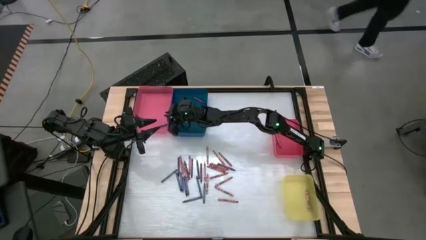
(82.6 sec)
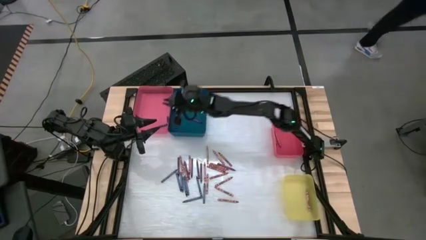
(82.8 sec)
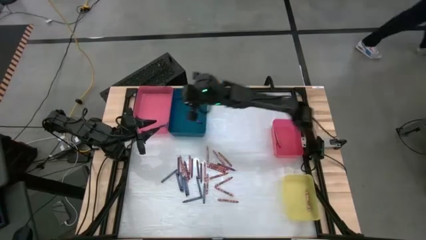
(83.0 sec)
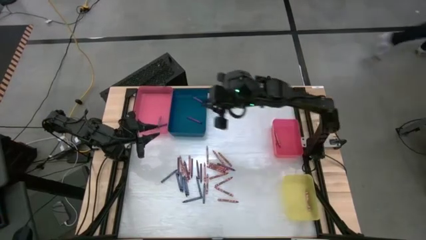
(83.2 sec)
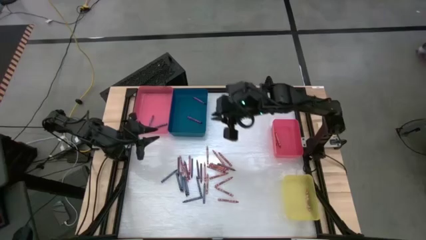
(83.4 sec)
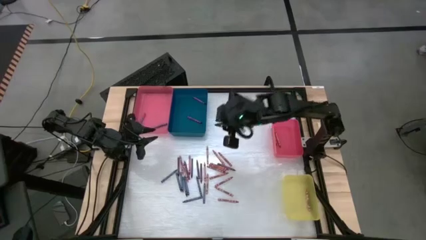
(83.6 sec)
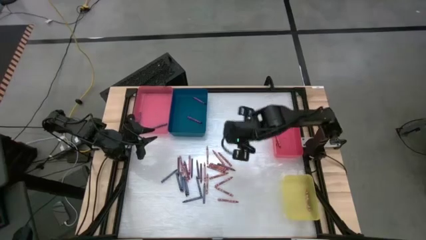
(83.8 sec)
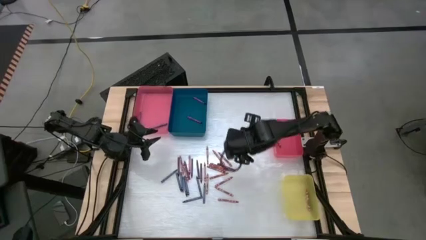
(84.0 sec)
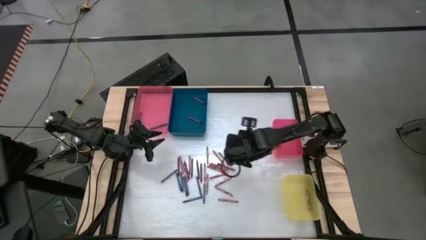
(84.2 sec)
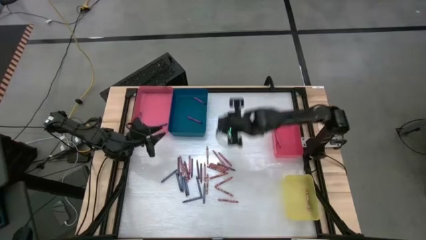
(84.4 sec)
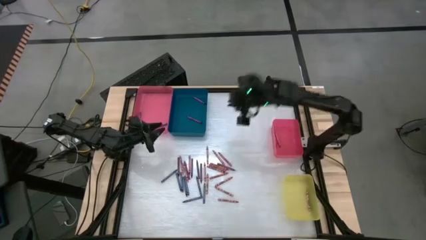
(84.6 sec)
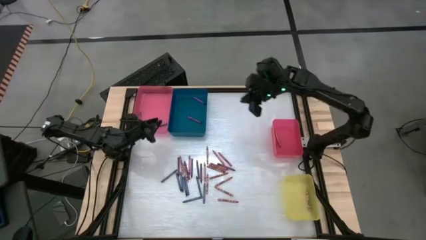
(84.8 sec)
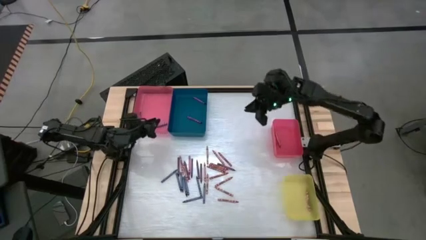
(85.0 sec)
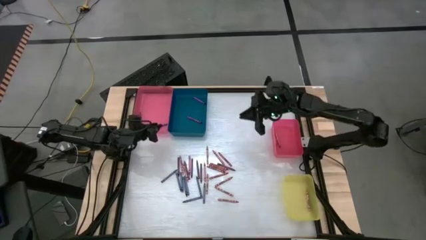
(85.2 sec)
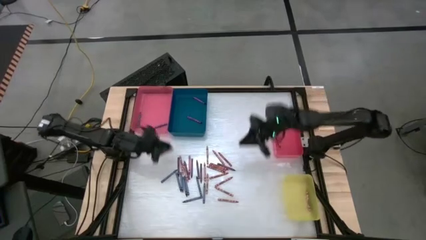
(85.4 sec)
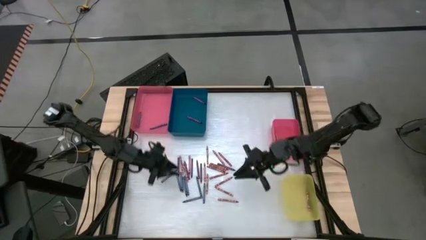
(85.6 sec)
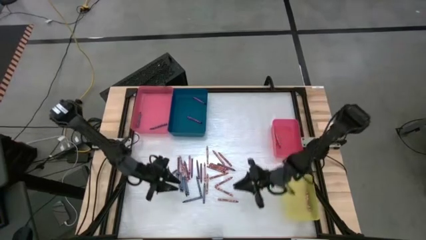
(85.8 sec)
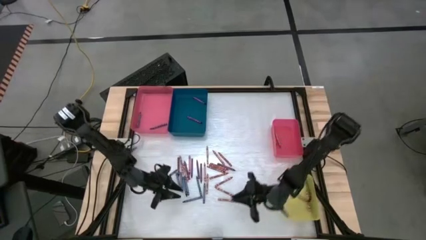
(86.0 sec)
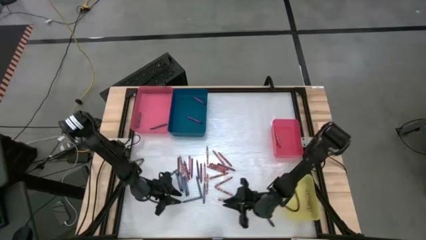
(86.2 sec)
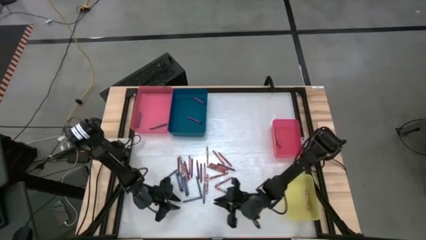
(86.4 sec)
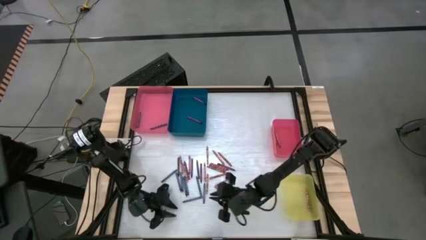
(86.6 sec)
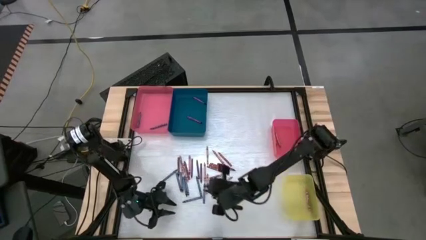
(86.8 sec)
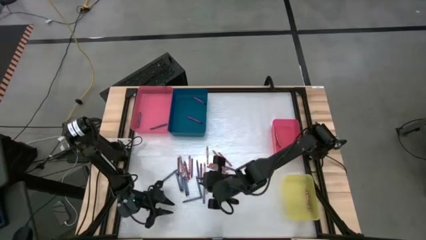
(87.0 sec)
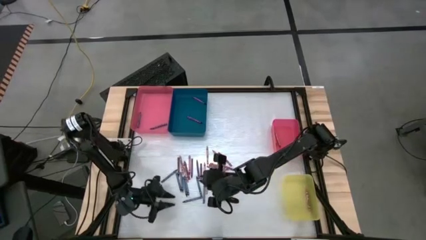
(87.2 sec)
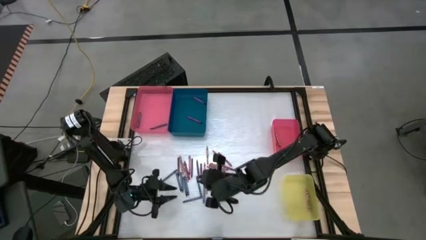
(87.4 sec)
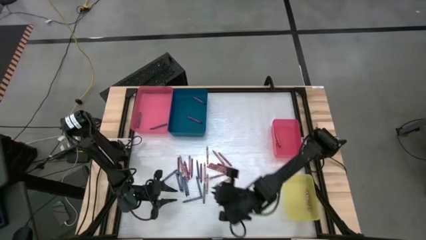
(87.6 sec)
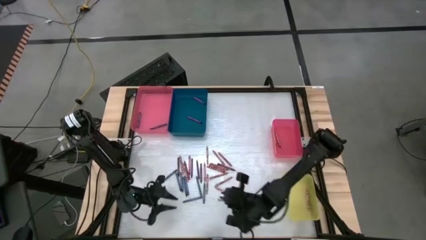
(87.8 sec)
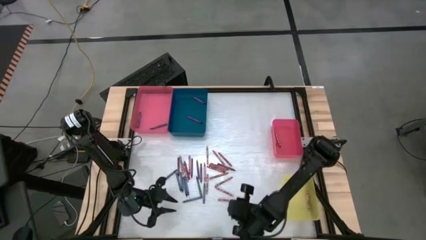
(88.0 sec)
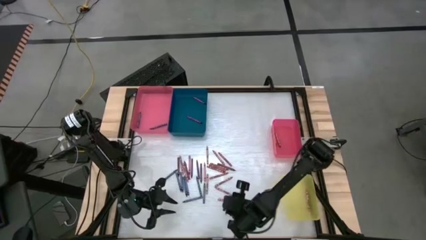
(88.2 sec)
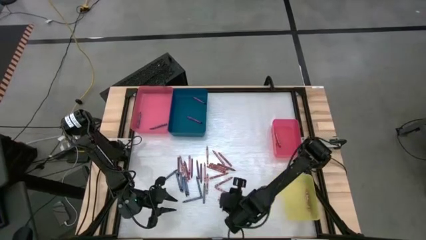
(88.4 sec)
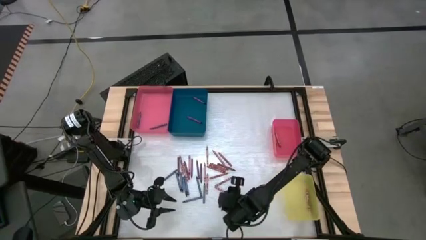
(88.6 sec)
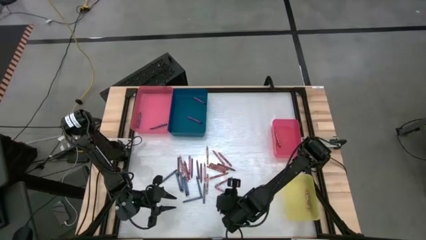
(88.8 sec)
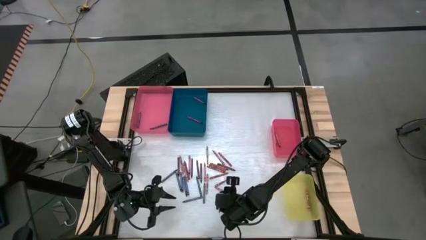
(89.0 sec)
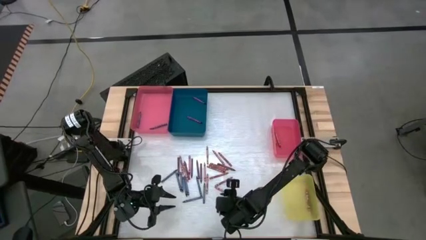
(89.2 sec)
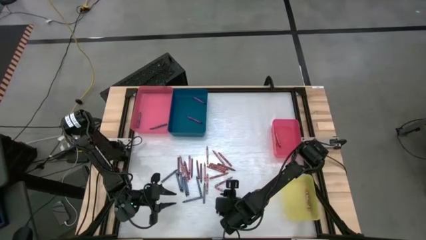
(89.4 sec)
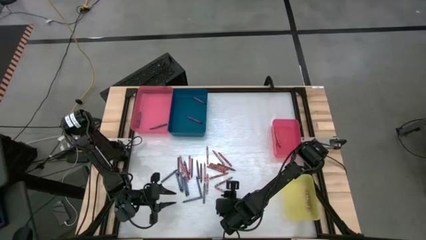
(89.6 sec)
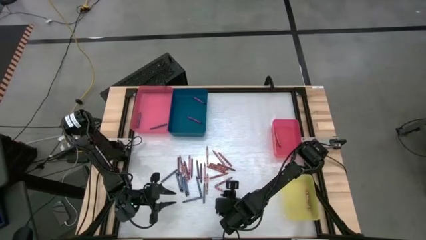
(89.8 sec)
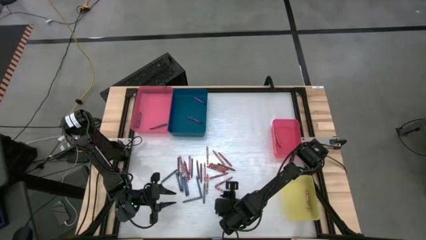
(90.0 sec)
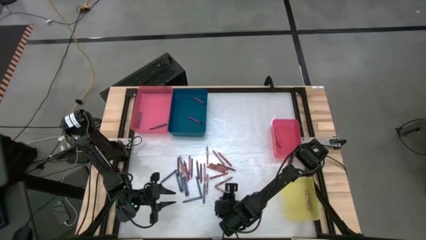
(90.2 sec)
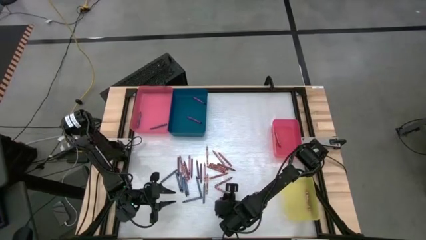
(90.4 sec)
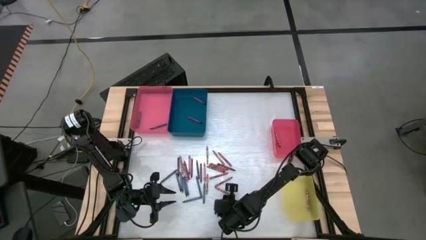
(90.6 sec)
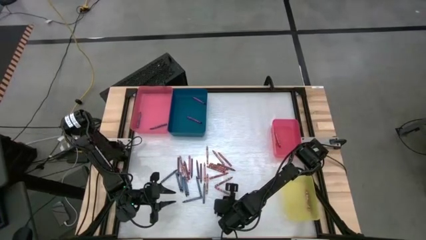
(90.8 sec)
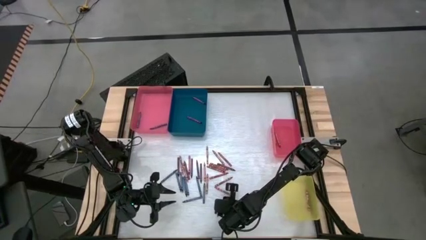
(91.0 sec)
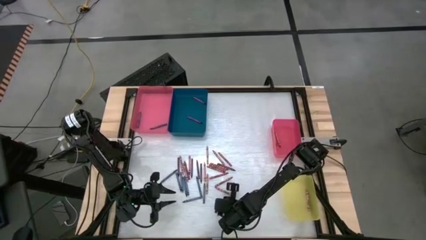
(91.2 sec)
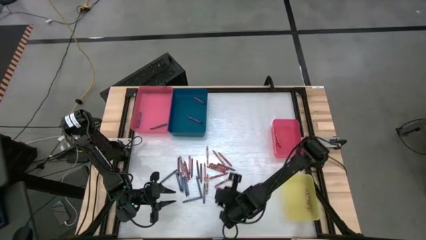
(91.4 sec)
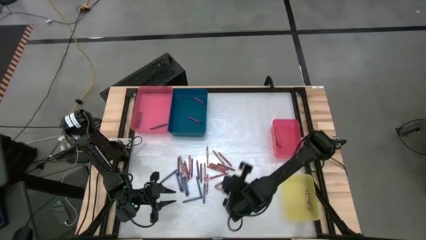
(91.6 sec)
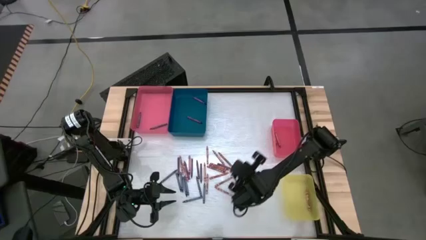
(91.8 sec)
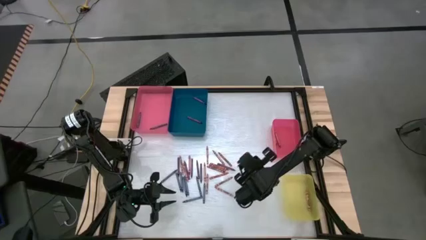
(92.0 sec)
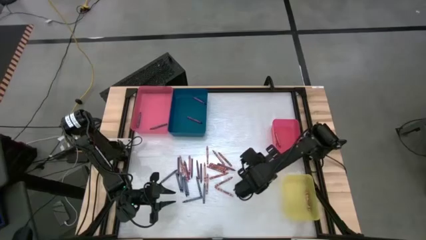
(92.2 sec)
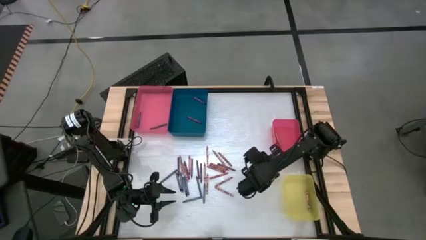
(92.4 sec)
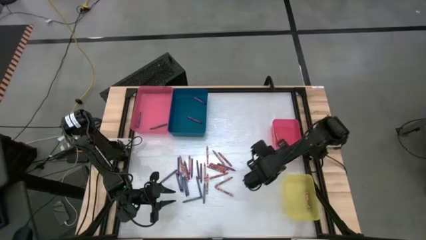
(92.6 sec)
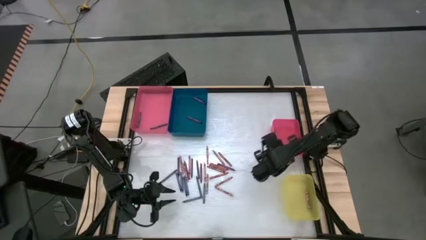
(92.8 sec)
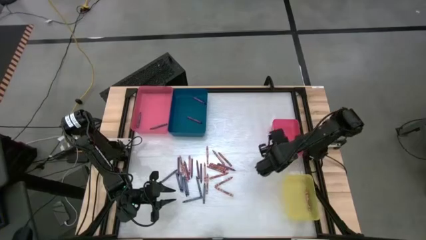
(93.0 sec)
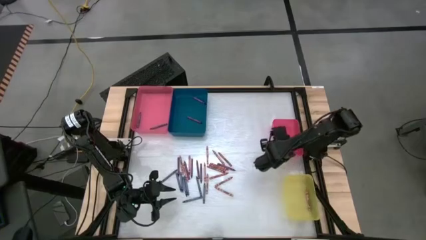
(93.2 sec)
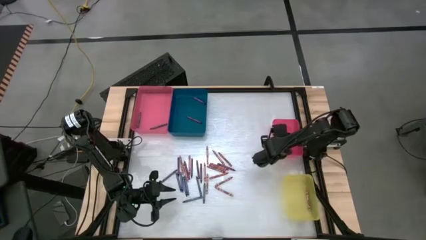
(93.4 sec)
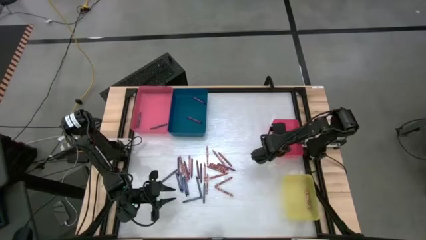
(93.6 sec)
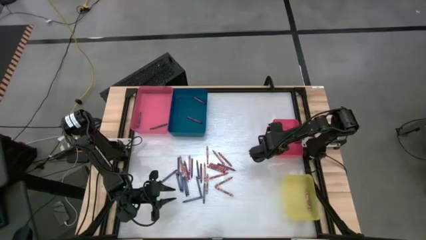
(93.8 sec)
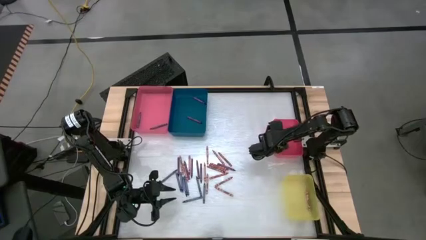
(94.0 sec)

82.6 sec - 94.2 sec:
Task: Sort crayons
Put the red crayon into the small red bin

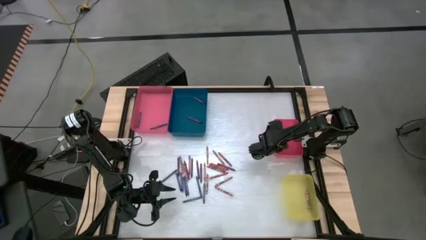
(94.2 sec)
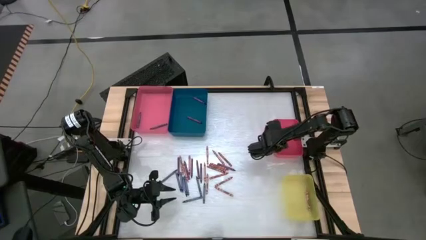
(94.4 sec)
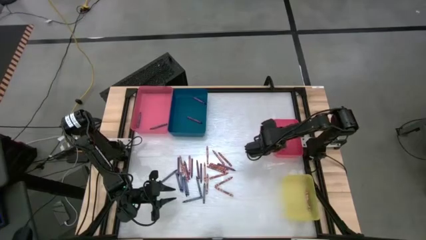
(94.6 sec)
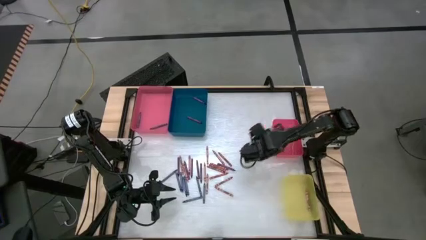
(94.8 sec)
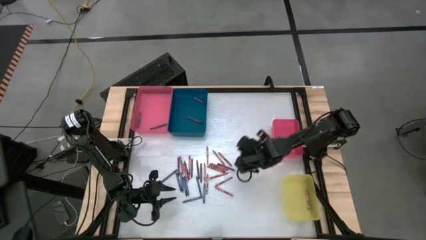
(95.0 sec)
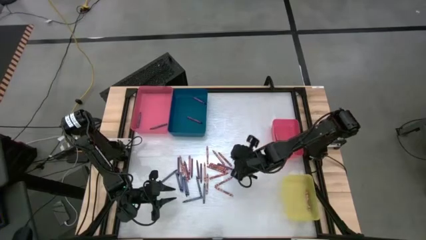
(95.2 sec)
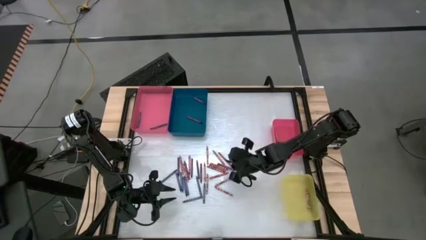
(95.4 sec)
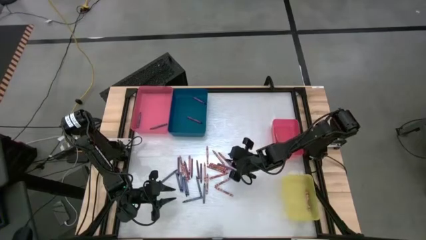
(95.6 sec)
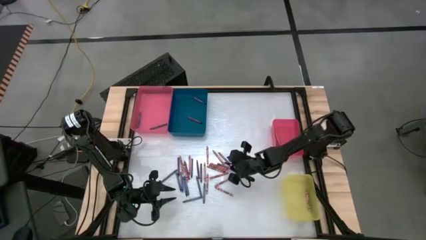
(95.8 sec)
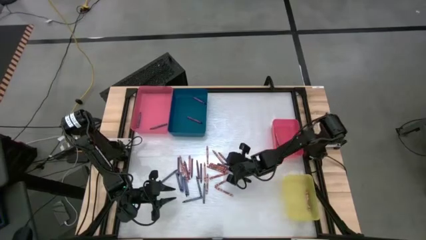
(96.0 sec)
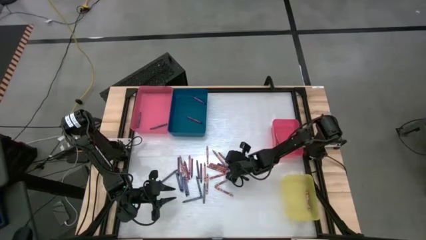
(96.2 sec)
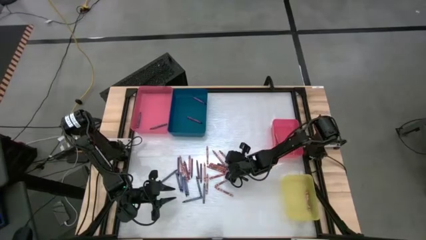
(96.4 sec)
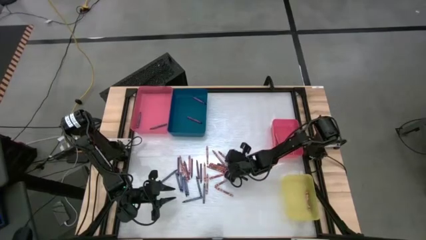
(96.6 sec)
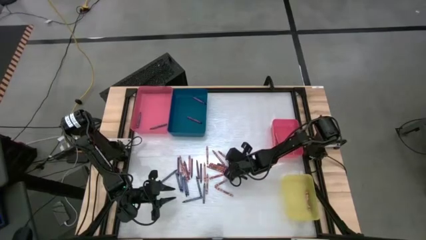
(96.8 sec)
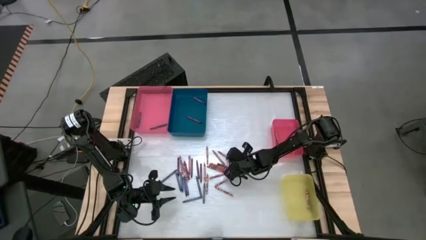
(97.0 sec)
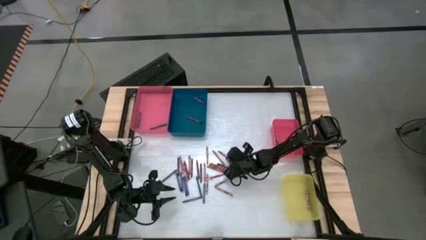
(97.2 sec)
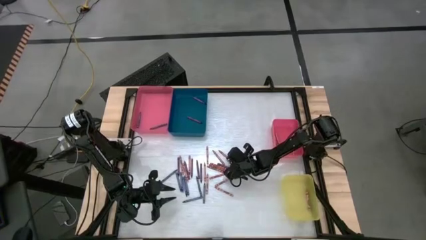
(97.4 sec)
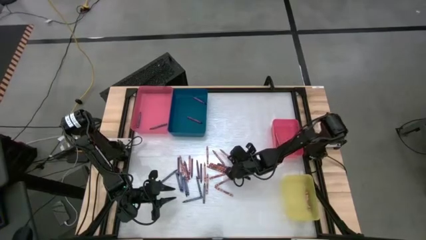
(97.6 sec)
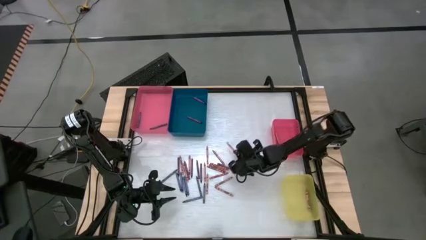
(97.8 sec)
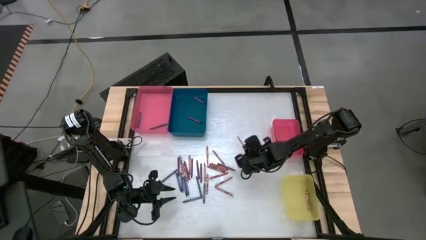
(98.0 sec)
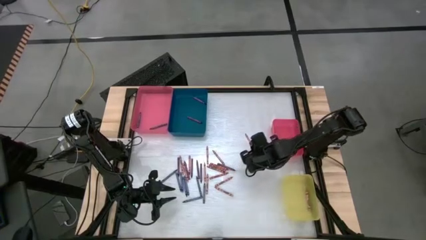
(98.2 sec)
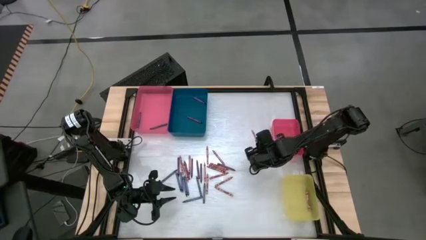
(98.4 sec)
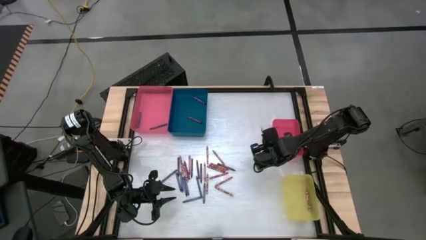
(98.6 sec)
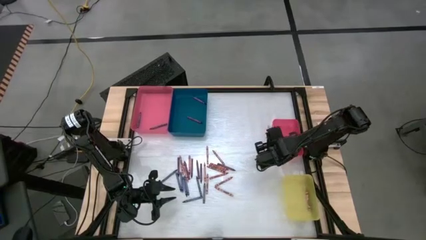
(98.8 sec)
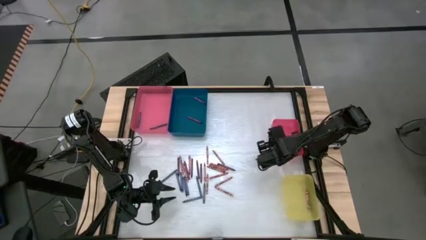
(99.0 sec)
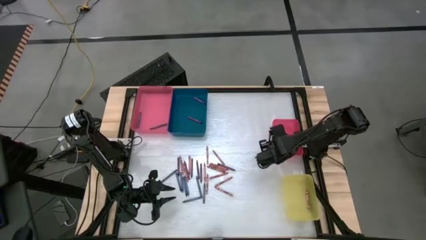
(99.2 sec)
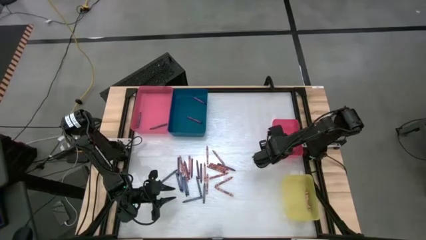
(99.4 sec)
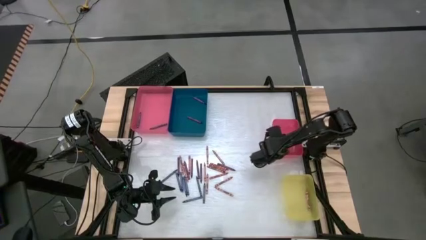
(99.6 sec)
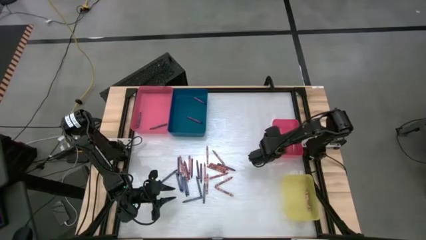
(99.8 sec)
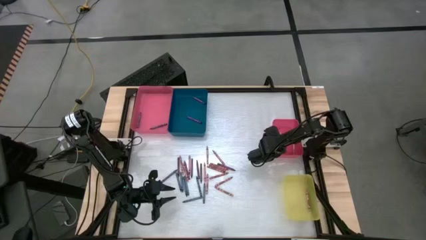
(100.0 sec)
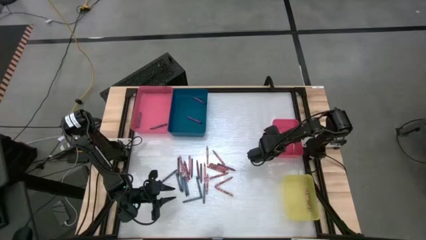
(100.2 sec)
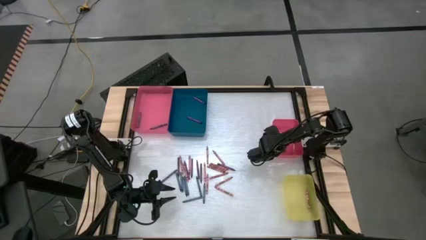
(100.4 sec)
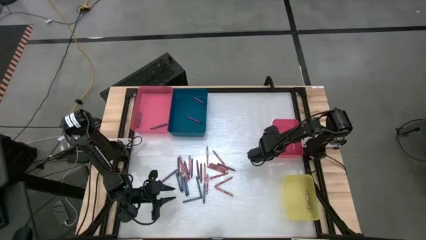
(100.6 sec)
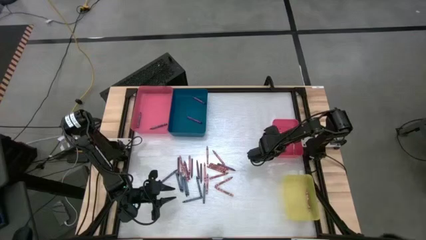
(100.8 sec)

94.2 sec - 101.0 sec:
Put the red crayon into the small red bin
